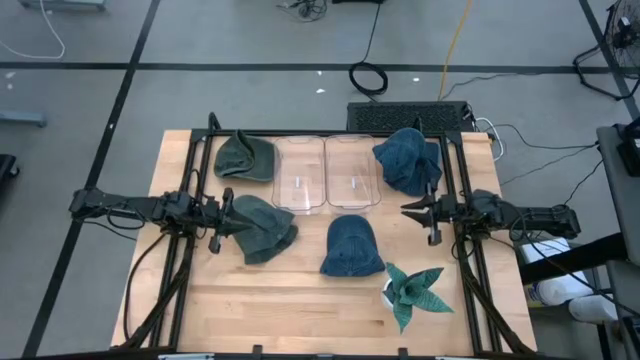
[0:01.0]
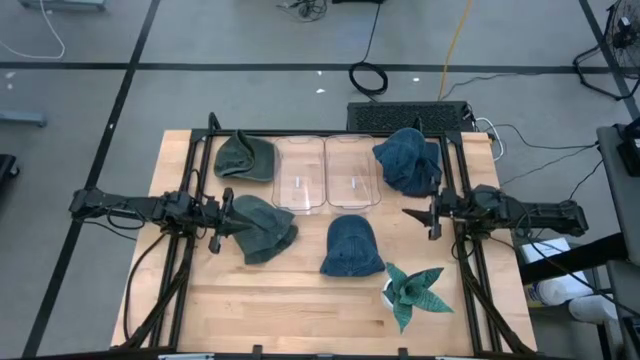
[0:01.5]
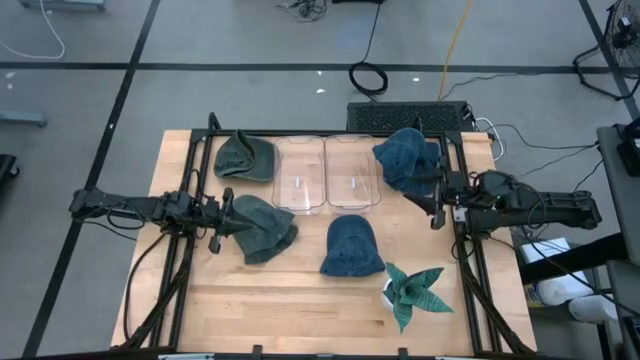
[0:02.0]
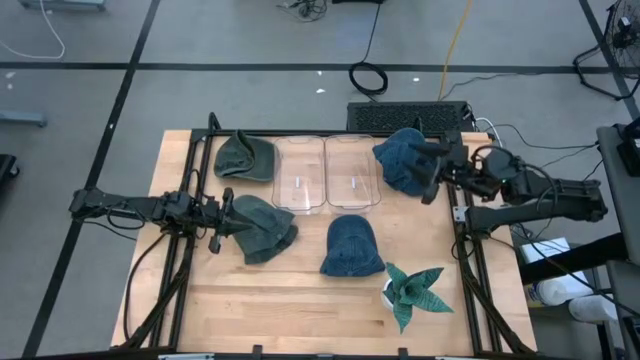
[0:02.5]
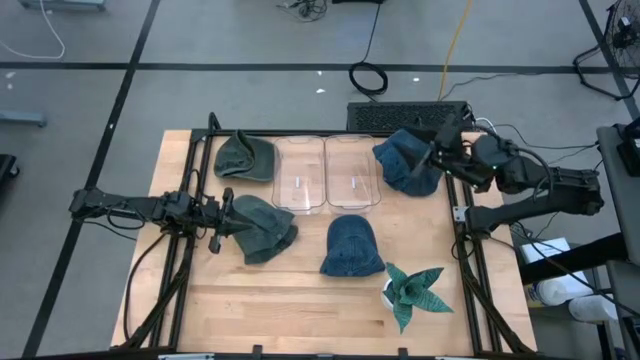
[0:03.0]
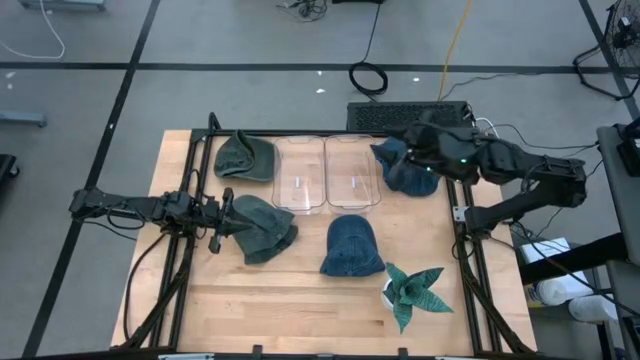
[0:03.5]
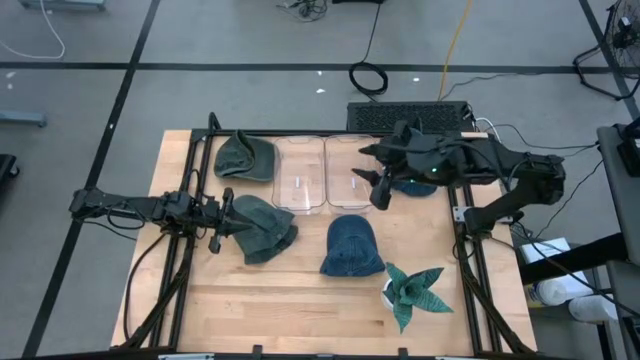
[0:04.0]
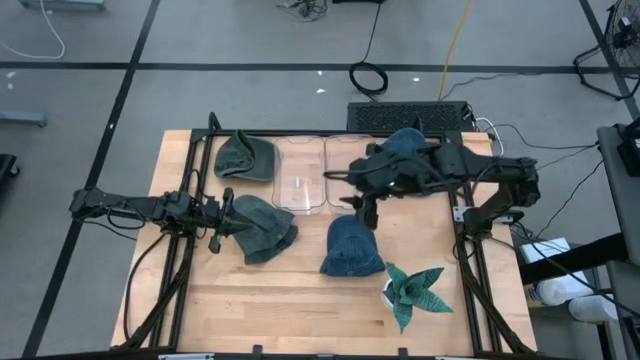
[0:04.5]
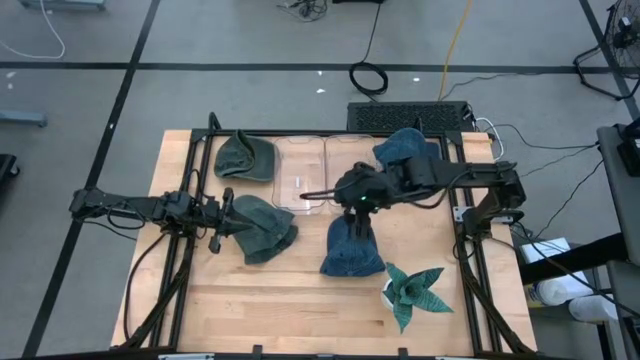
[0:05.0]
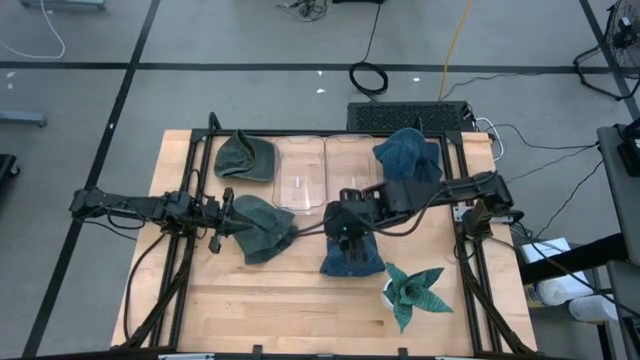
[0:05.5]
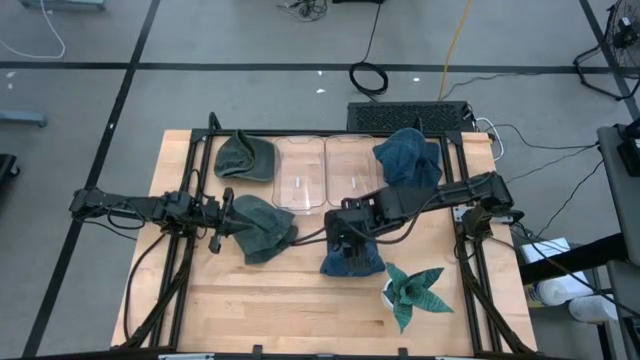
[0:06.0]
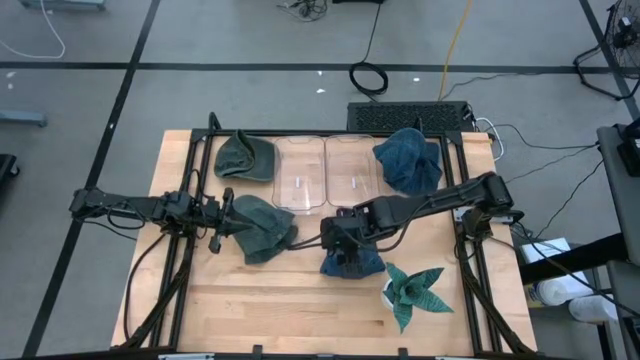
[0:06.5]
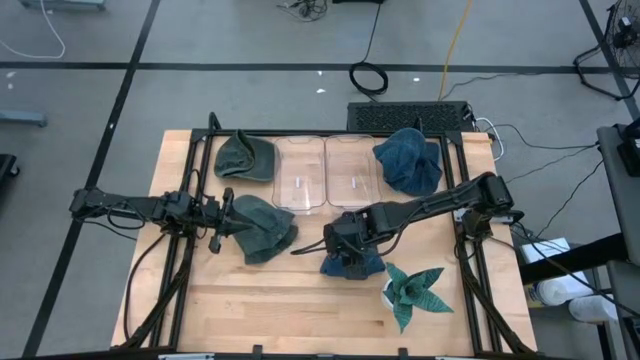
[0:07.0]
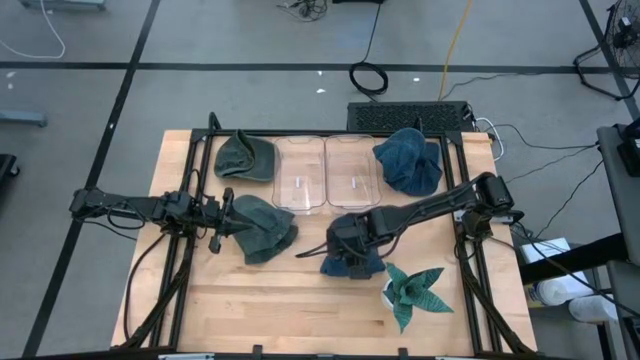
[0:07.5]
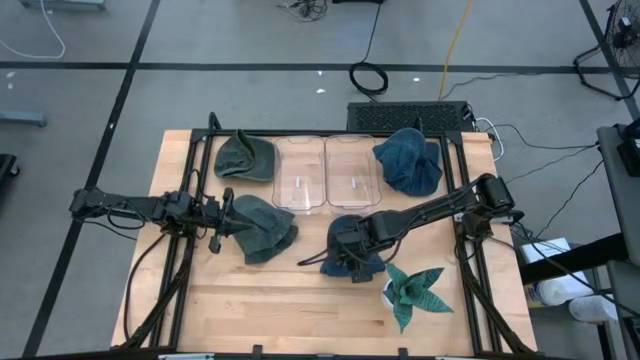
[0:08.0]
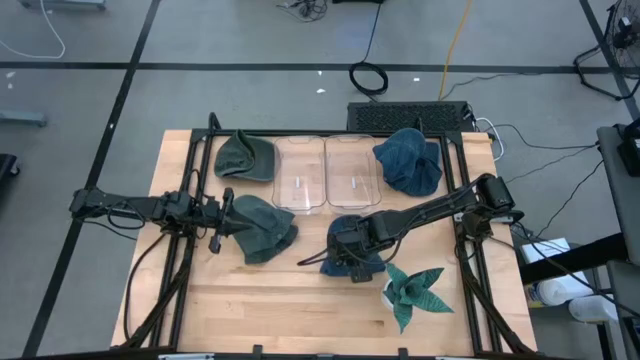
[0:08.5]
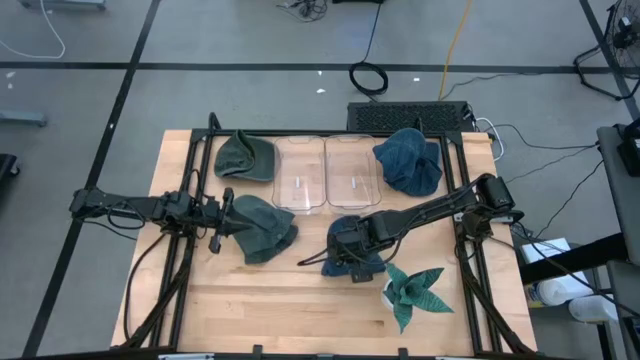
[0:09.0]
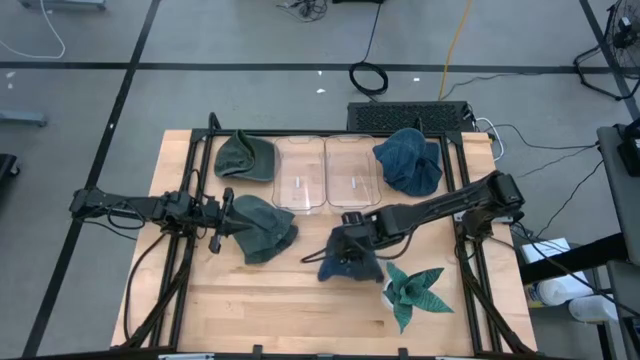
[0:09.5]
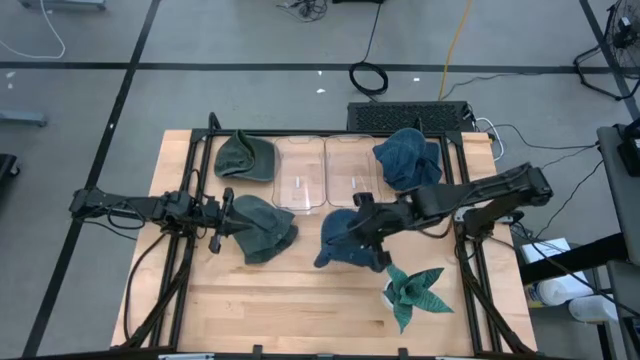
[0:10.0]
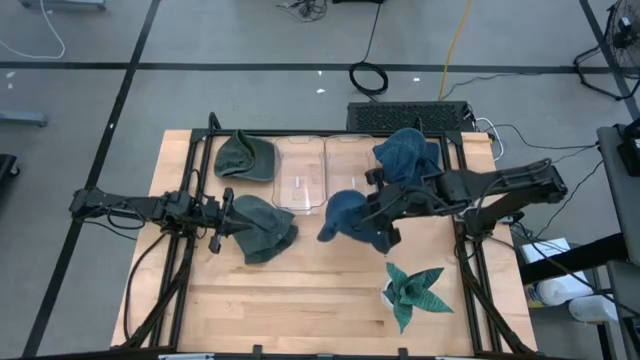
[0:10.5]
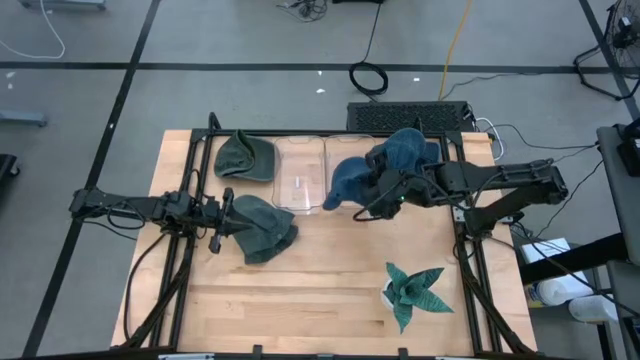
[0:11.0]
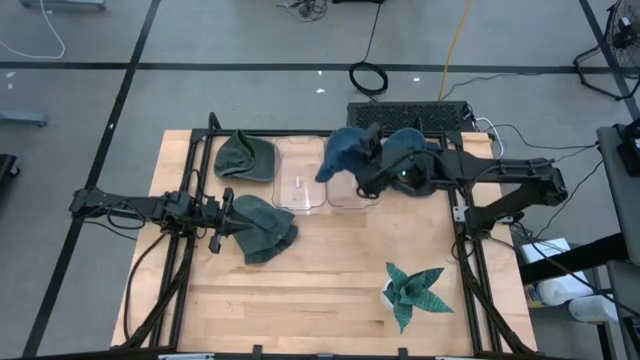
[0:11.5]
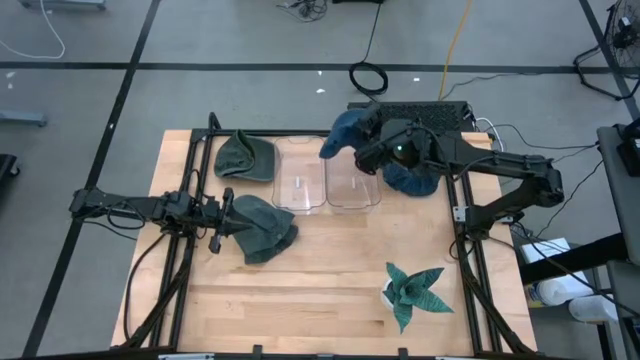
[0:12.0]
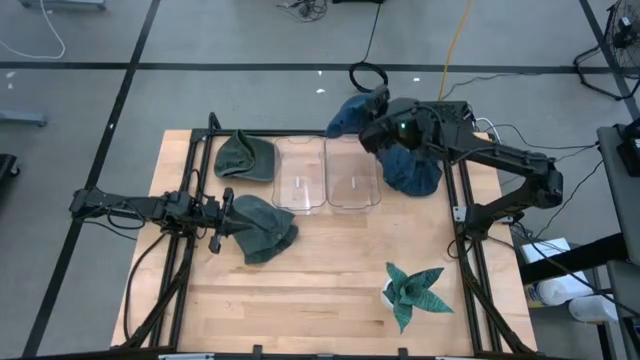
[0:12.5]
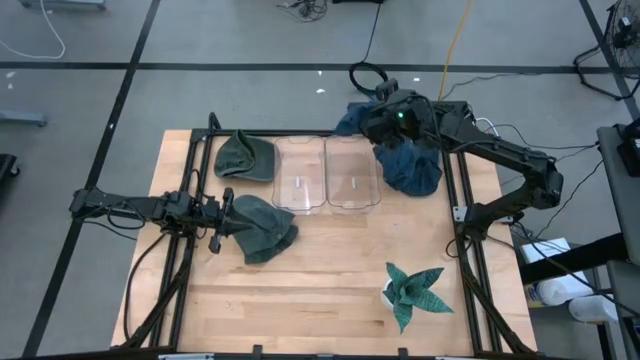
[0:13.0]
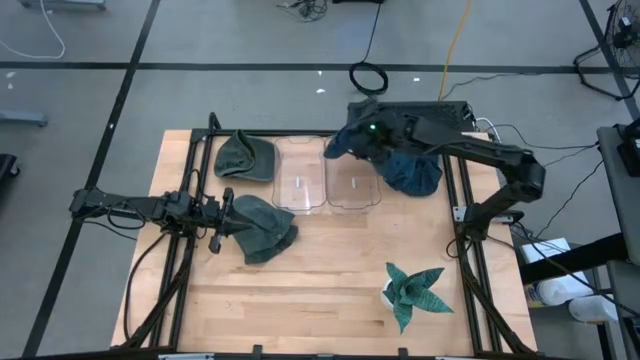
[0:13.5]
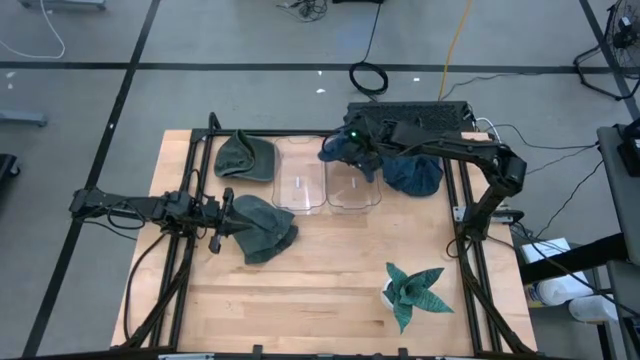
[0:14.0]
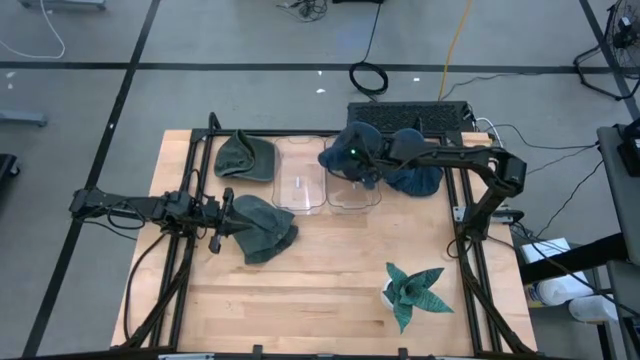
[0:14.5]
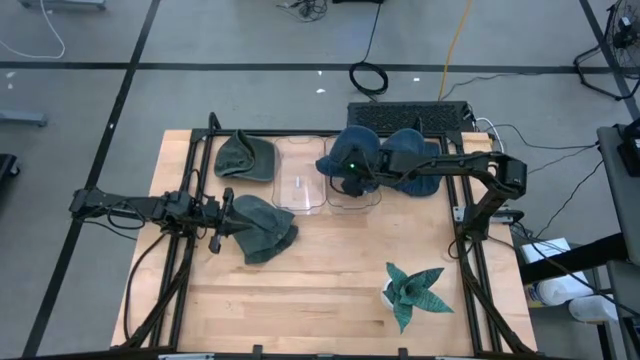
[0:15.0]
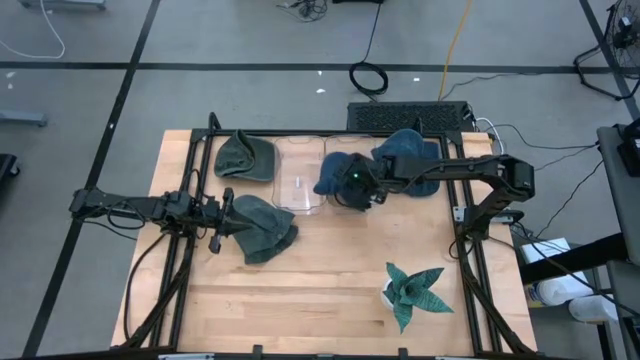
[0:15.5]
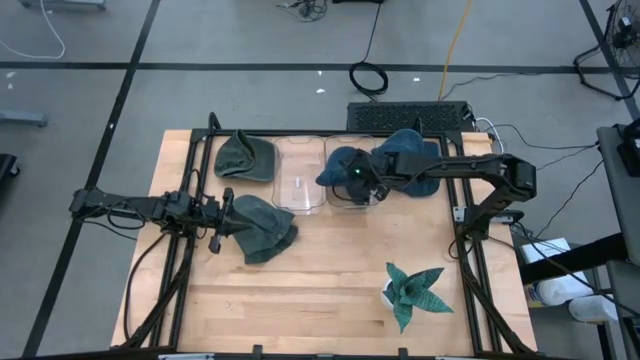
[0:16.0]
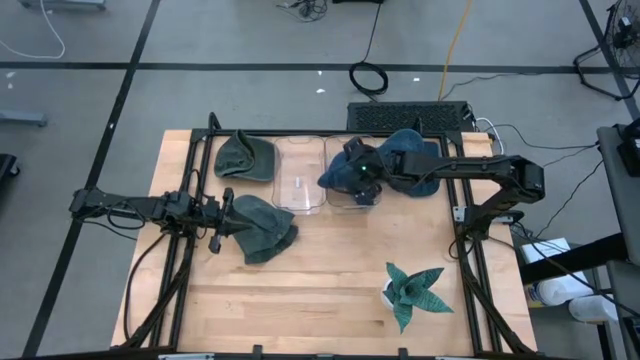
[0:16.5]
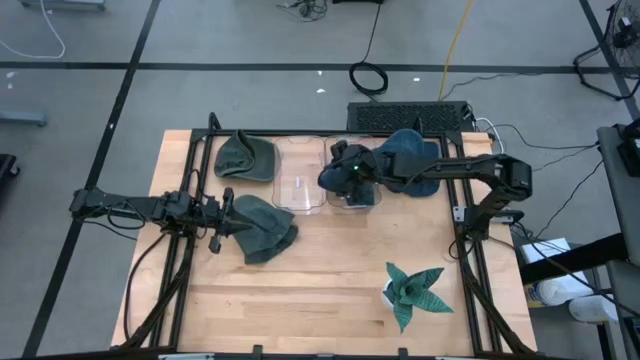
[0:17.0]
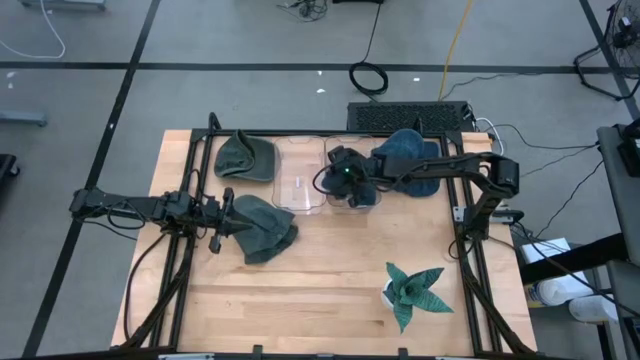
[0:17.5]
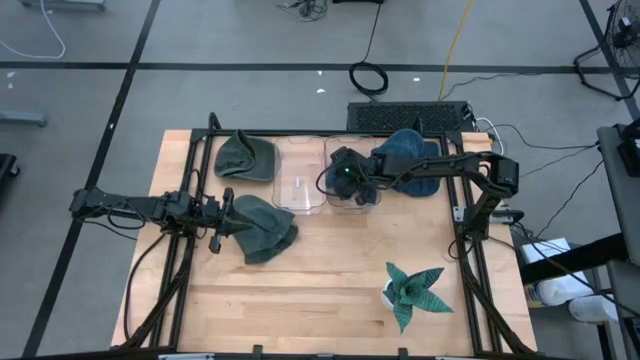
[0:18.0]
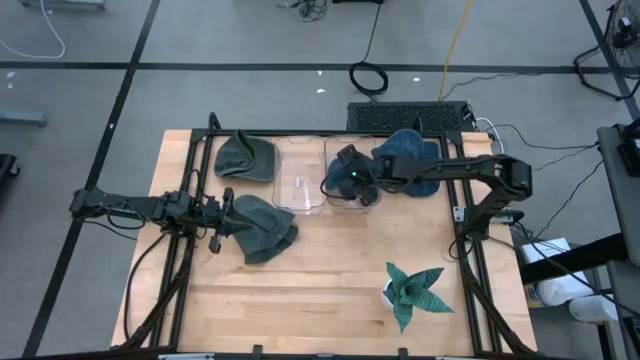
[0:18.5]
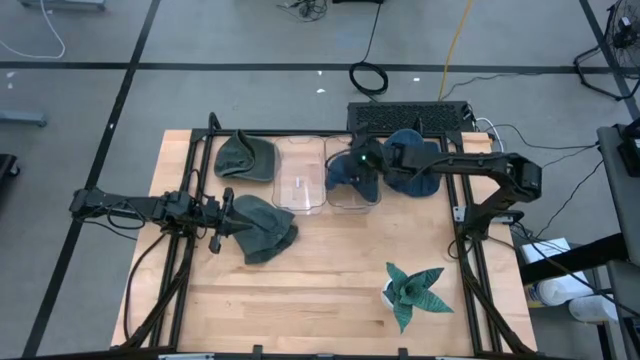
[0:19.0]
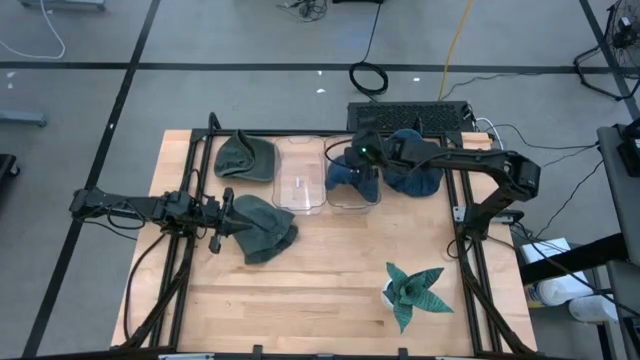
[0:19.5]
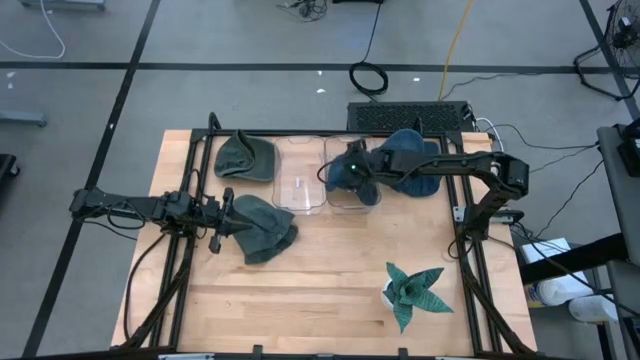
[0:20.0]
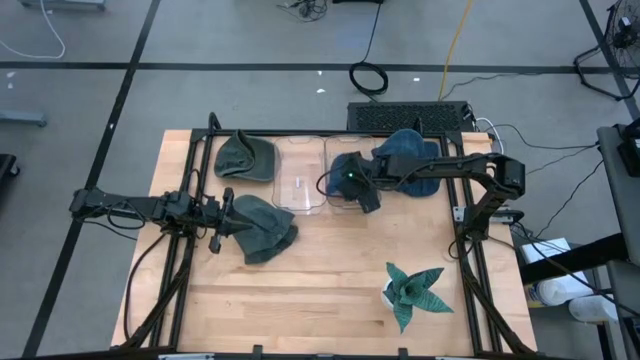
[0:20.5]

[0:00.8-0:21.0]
Task: Pick & Place hat
Put the bottom blue cap into the right transparent bin
